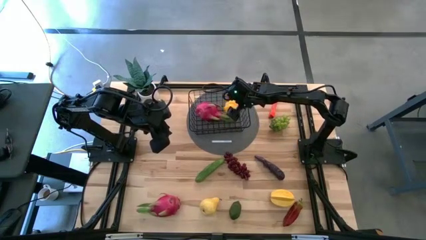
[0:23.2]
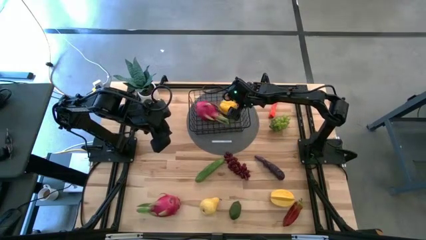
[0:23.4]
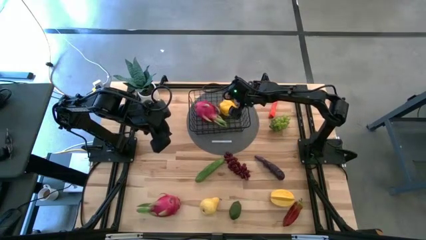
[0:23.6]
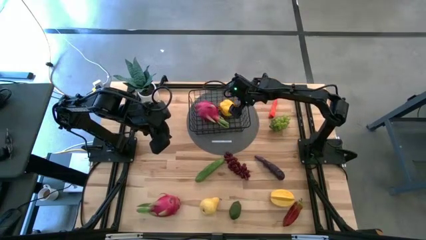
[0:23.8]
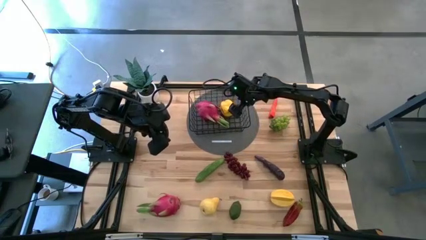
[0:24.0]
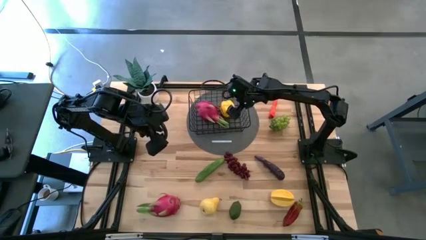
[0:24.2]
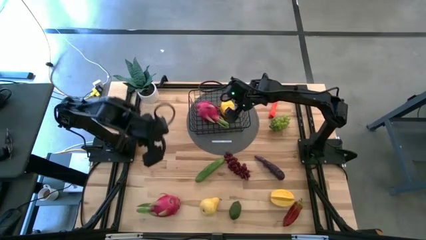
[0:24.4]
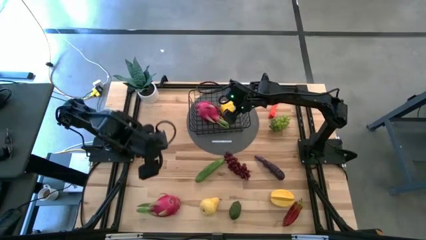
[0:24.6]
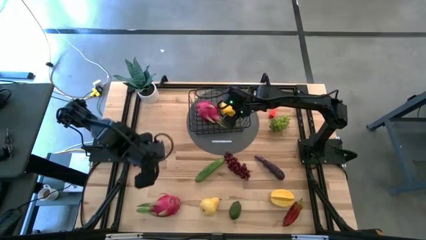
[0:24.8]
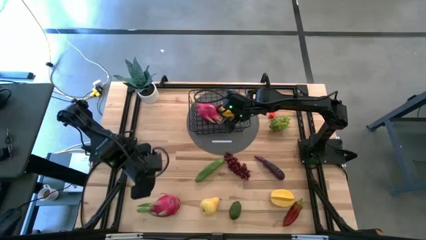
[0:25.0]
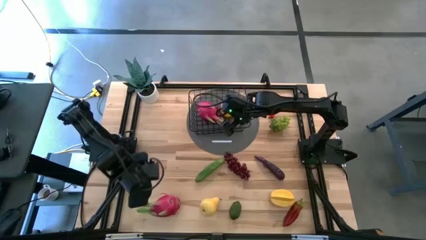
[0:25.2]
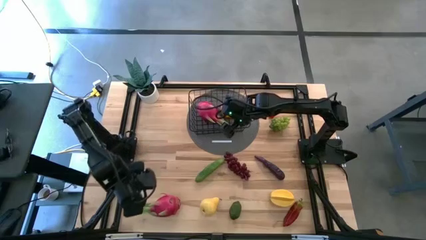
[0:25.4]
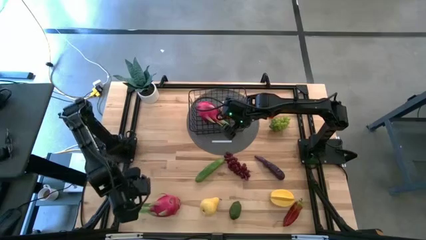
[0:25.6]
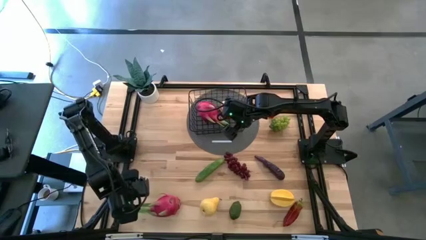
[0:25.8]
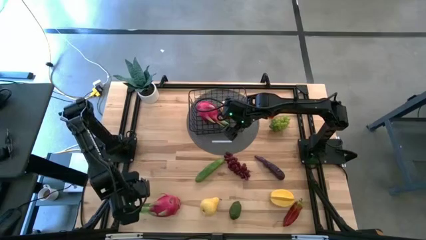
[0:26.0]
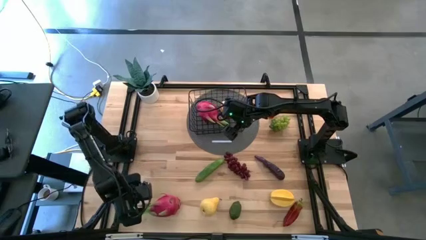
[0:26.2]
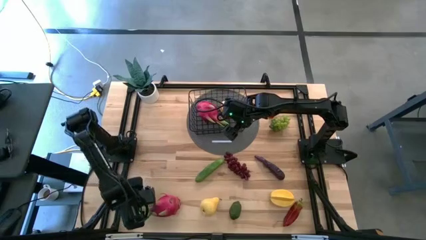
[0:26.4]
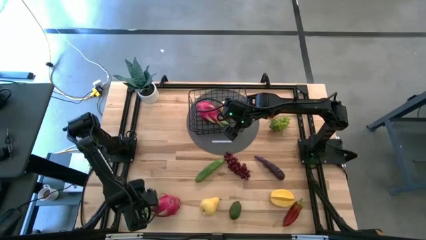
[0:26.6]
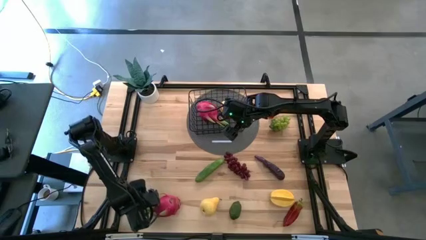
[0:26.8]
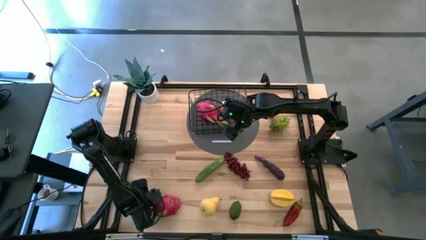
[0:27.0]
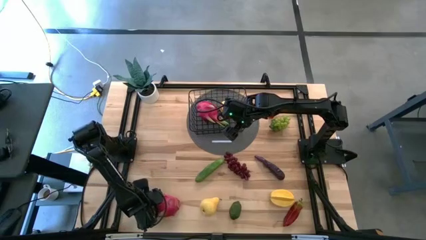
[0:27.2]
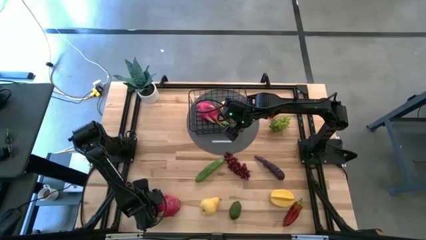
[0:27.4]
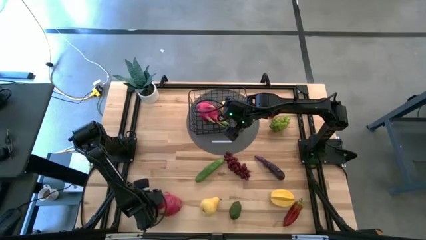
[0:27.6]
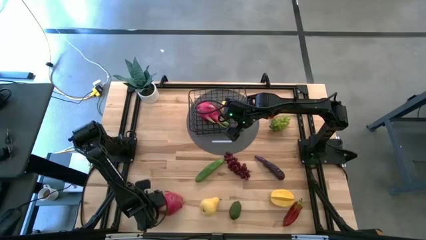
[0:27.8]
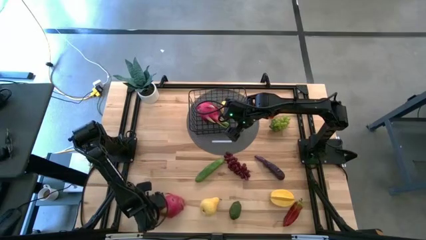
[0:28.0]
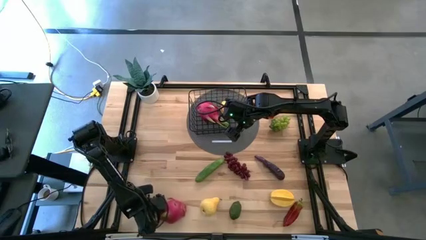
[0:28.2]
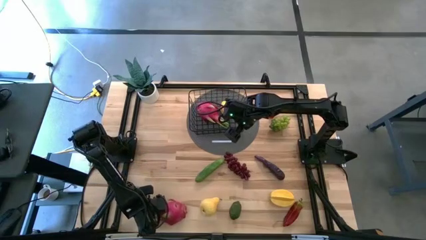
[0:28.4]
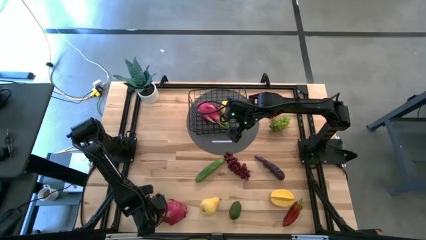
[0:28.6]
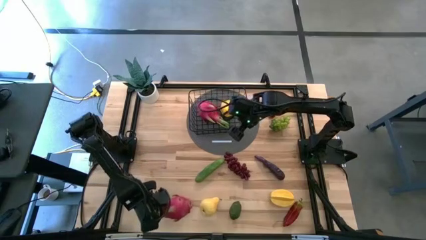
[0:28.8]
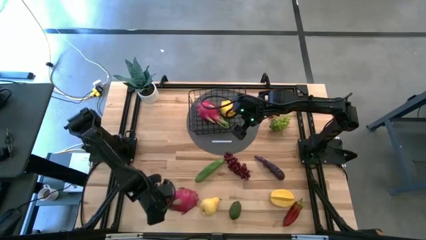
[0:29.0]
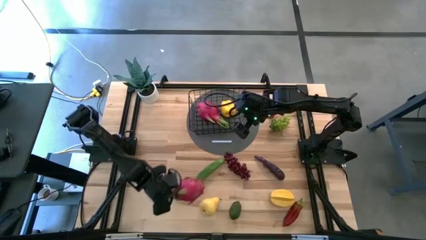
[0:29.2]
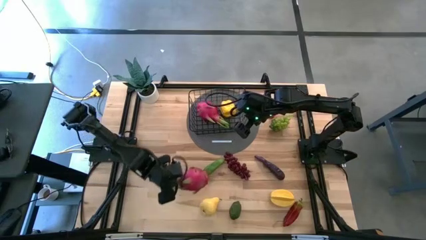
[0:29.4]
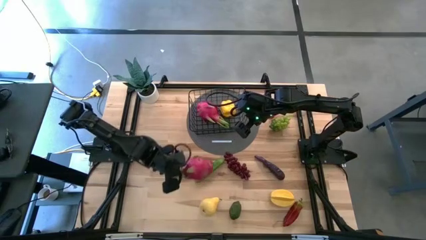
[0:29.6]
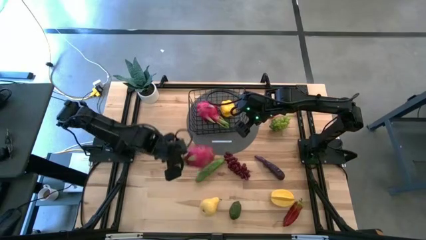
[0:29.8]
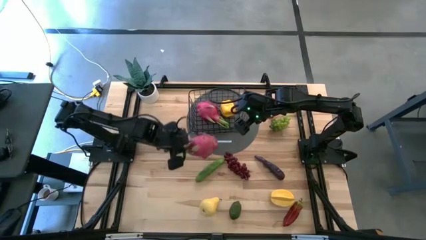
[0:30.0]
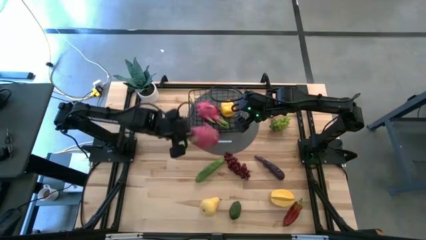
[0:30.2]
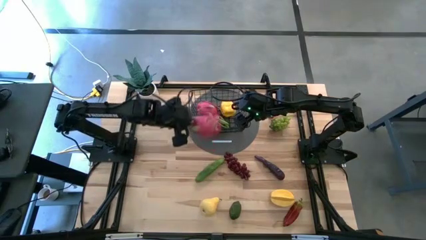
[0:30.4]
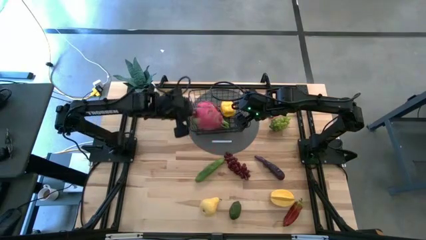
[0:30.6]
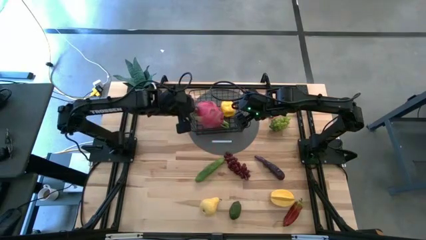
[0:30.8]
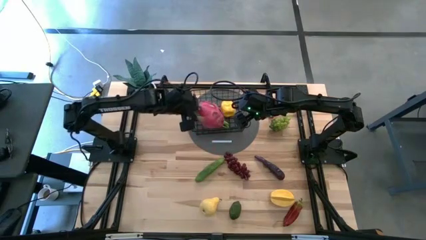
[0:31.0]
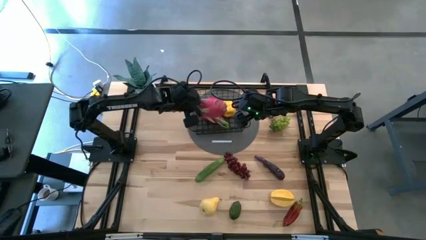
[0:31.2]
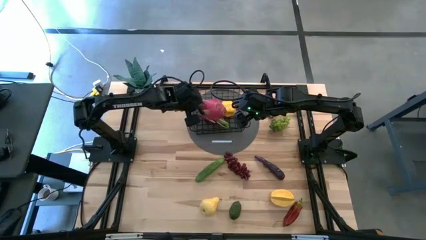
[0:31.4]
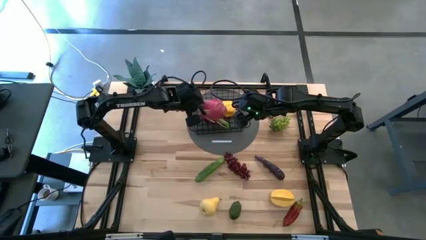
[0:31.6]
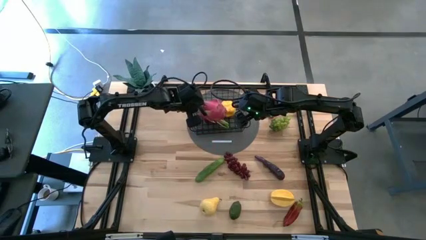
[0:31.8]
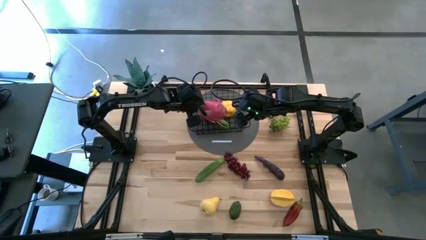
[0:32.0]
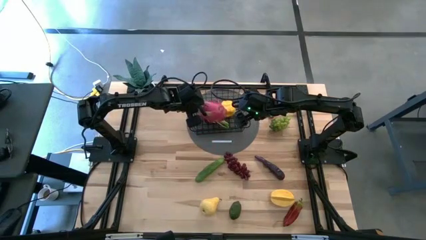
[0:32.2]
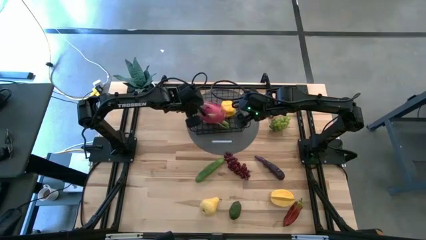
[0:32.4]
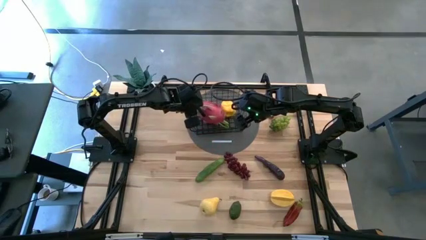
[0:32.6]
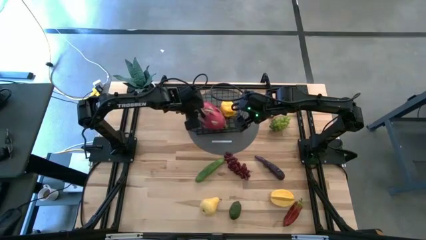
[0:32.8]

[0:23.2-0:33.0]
Task: Build produce basket
Put the dragon fruit into the wire basket

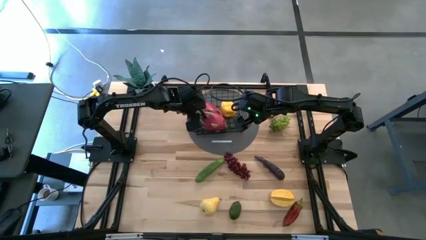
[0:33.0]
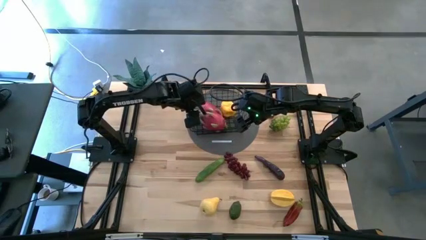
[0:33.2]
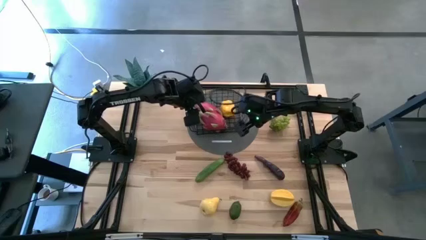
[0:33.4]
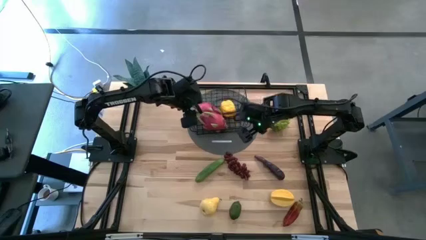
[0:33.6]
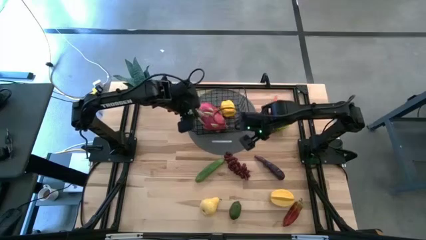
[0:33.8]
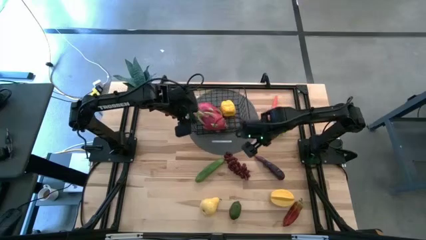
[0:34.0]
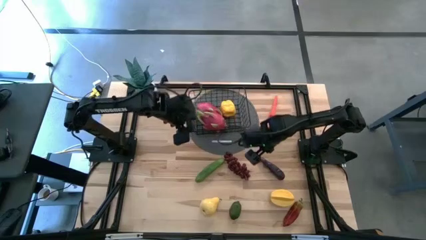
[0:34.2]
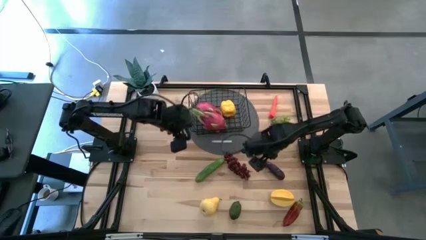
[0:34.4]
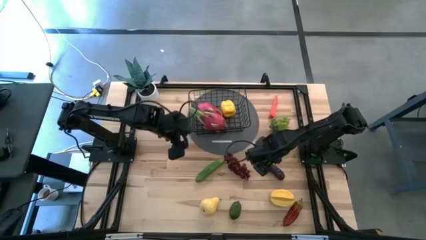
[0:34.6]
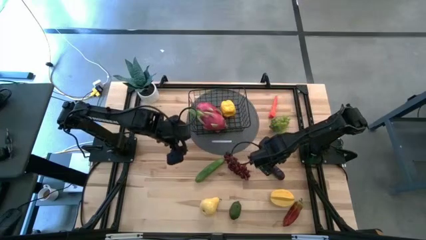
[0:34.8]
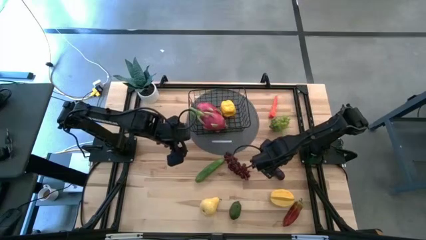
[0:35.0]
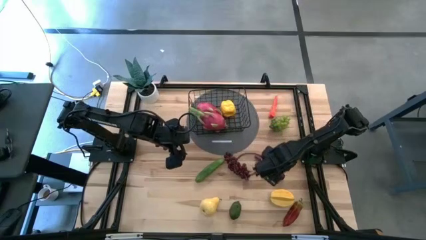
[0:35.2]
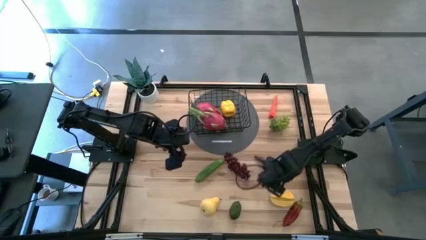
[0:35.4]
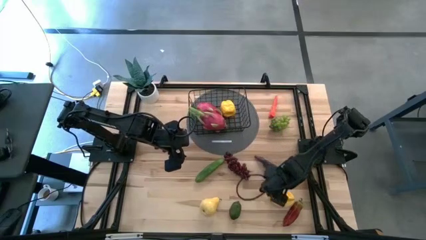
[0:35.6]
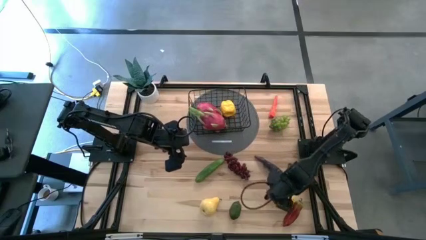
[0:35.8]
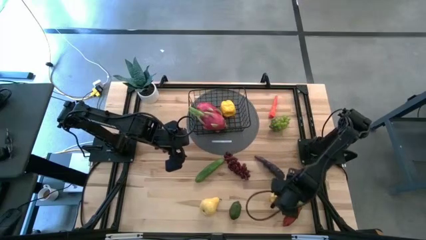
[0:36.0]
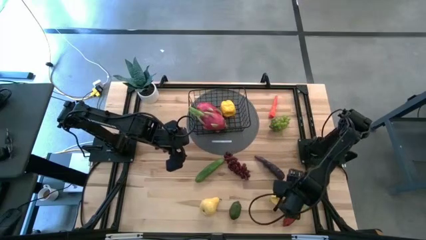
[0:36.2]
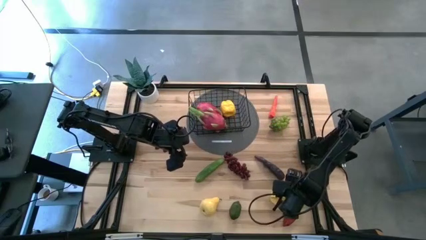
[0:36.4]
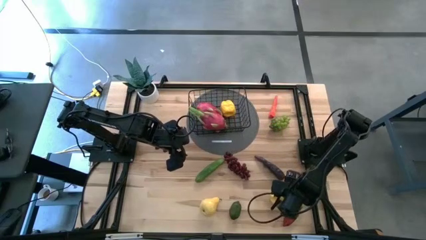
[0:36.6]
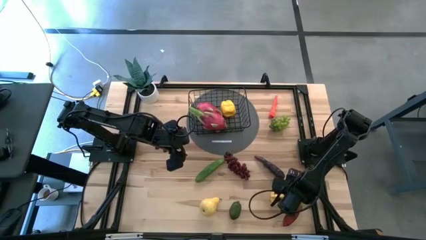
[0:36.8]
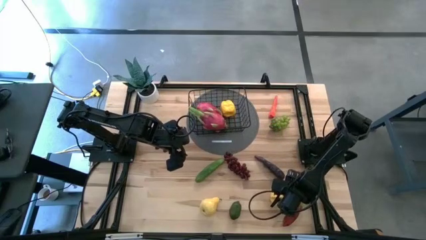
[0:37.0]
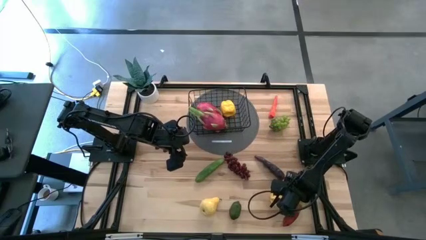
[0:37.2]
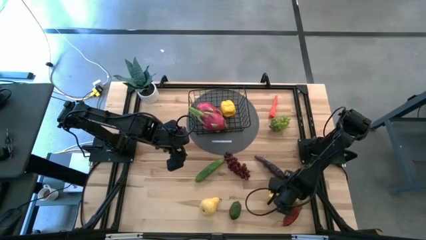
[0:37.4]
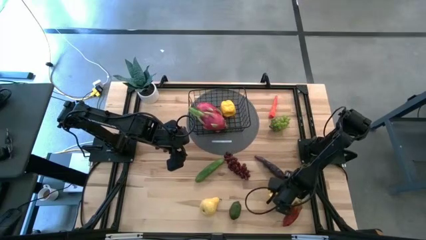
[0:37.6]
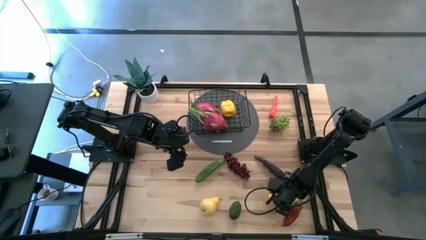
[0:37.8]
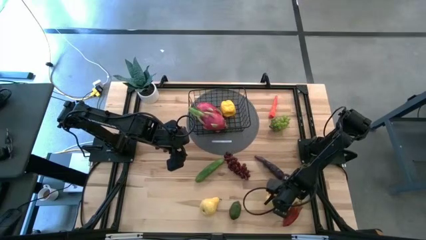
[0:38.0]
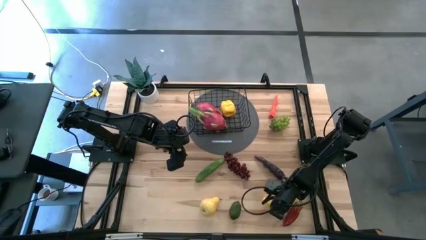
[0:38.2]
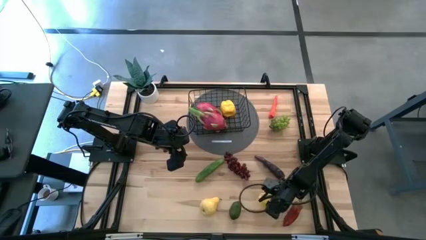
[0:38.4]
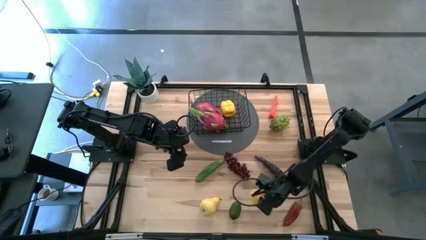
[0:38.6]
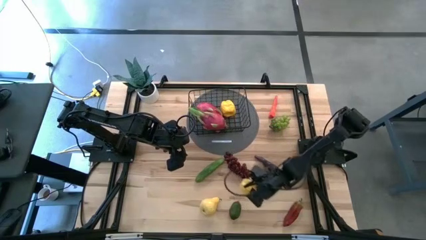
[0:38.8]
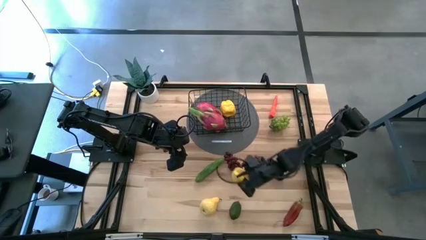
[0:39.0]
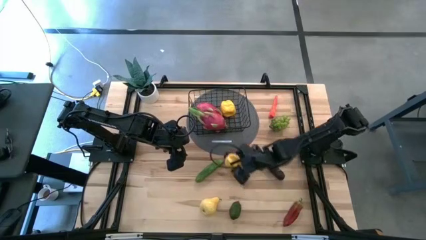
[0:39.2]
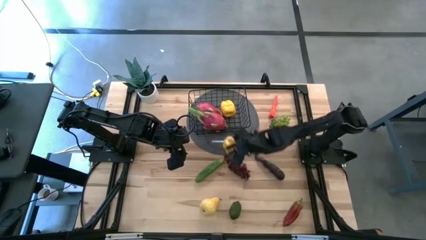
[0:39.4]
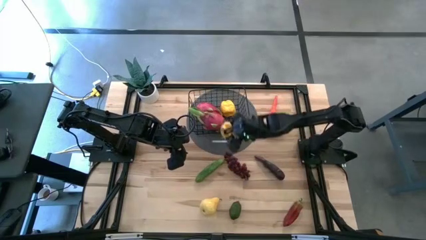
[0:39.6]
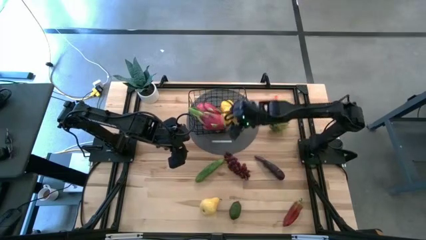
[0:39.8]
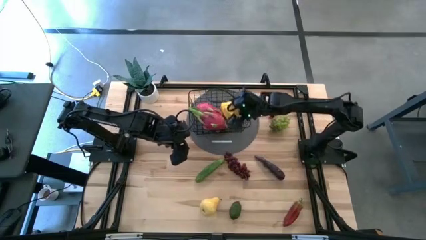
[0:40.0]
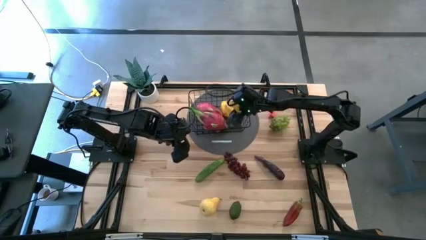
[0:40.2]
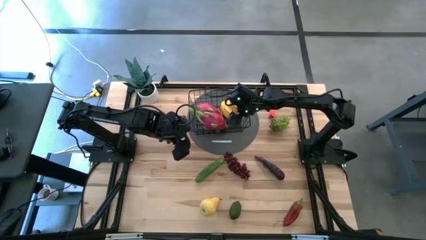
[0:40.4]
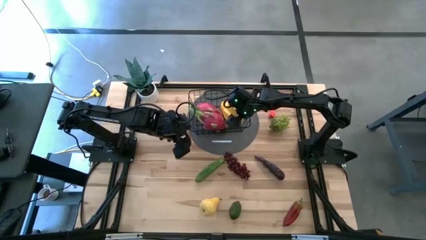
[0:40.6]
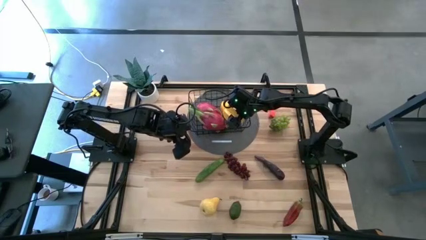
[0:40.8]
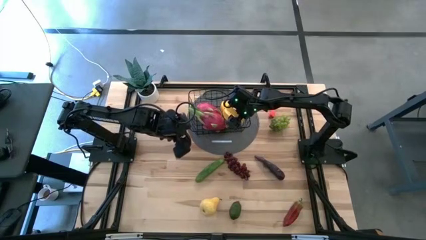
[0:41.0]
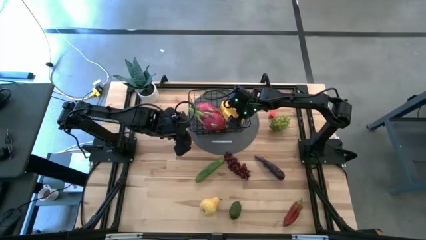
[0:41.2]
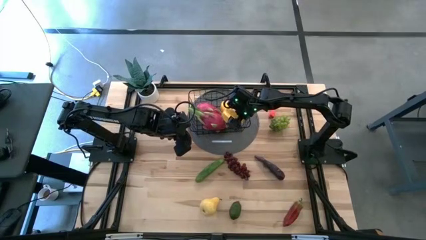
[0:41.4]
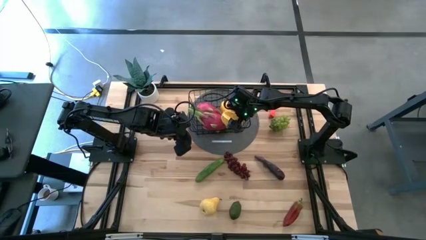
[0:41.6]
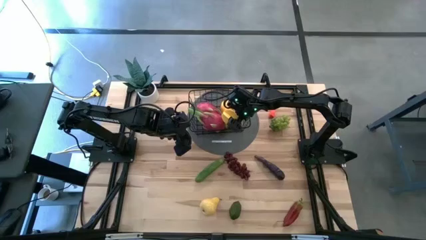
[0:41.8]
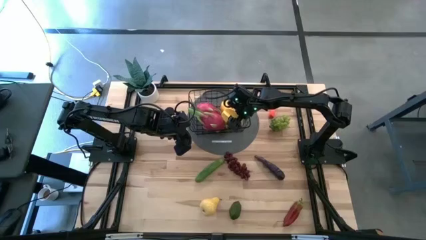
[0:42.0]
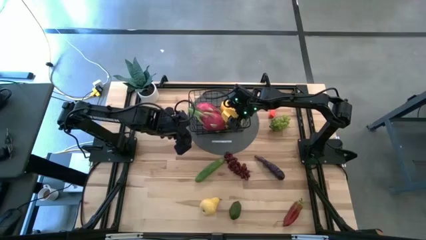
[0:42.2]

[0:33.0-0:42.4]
Put the starfruit into the wire basket
